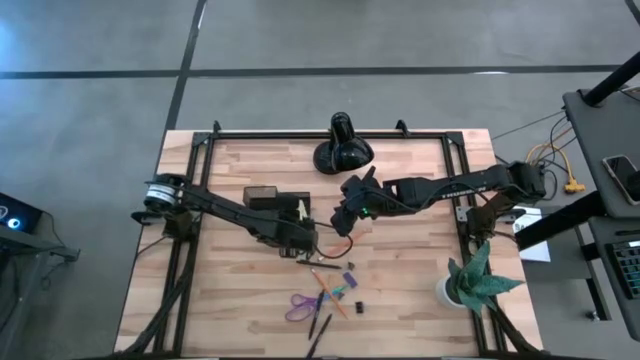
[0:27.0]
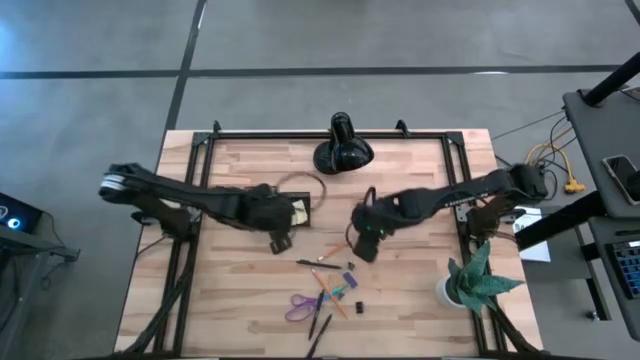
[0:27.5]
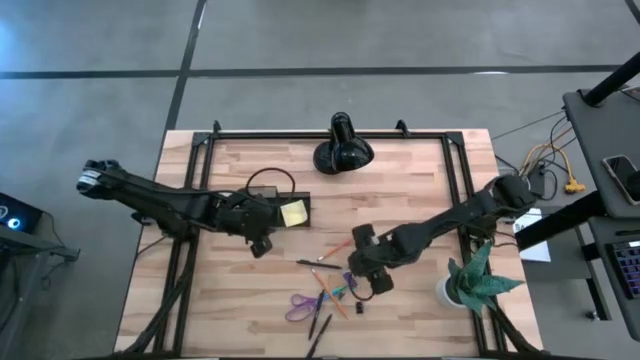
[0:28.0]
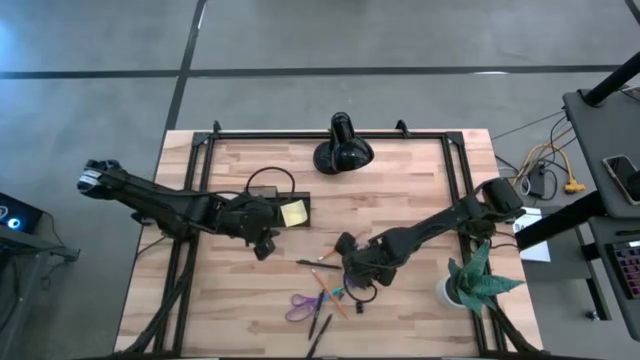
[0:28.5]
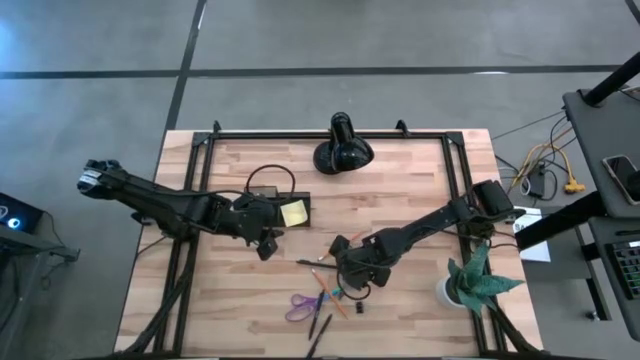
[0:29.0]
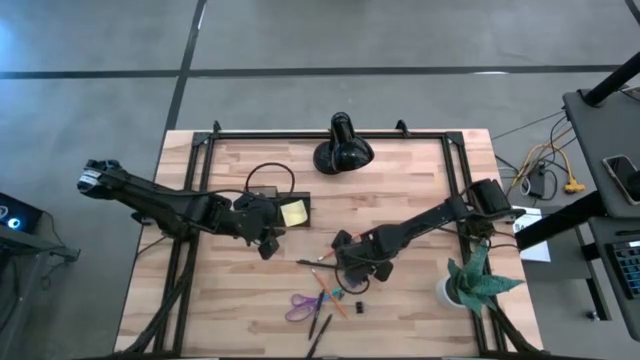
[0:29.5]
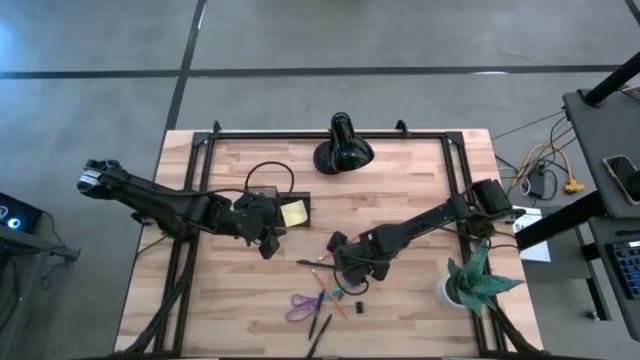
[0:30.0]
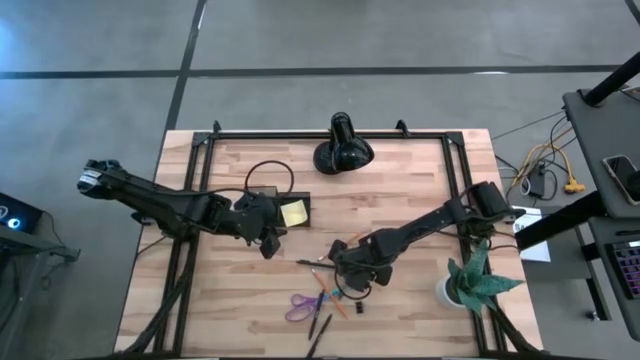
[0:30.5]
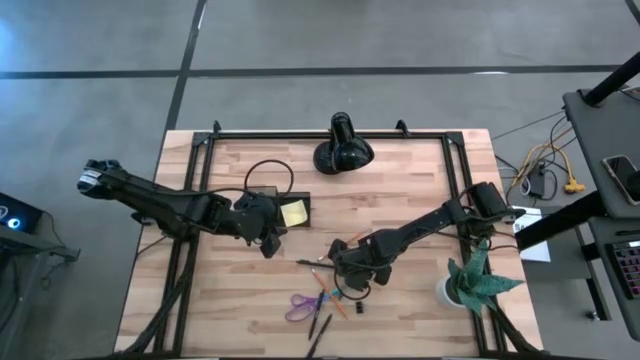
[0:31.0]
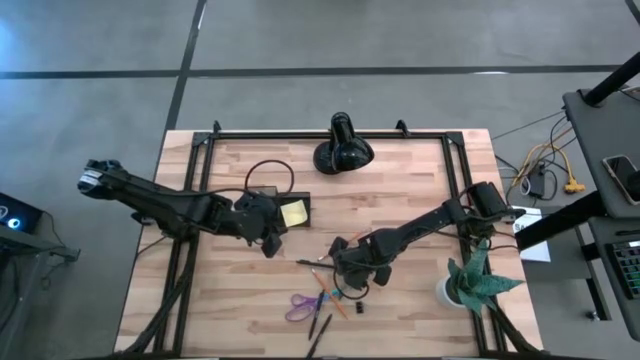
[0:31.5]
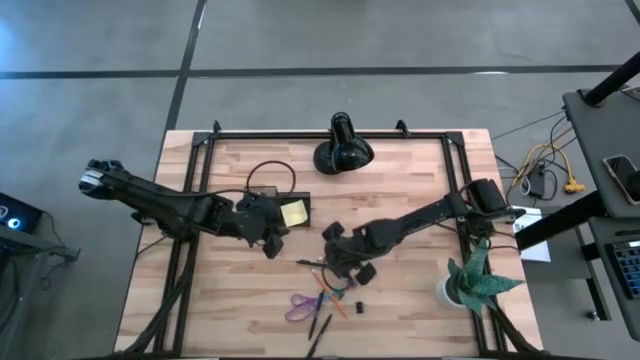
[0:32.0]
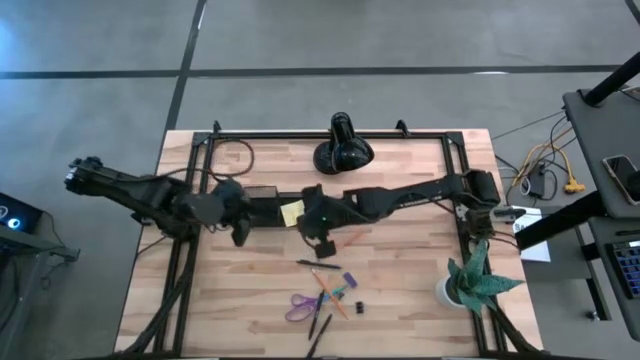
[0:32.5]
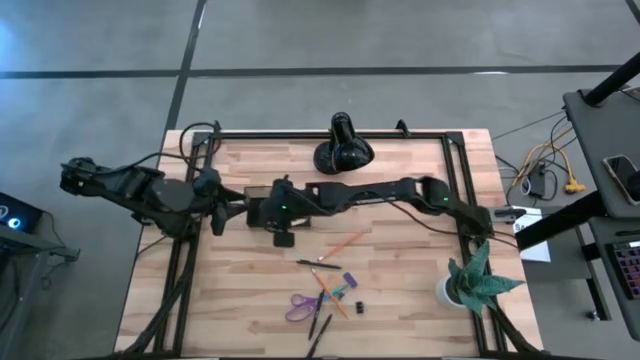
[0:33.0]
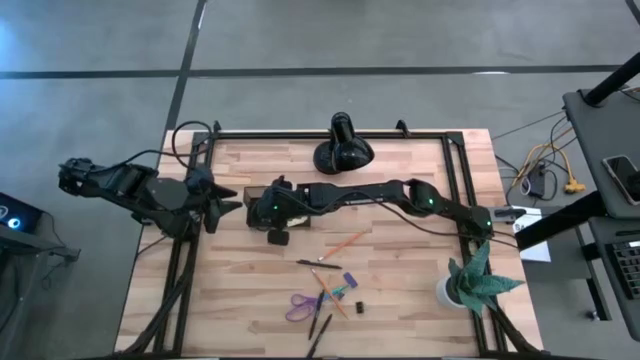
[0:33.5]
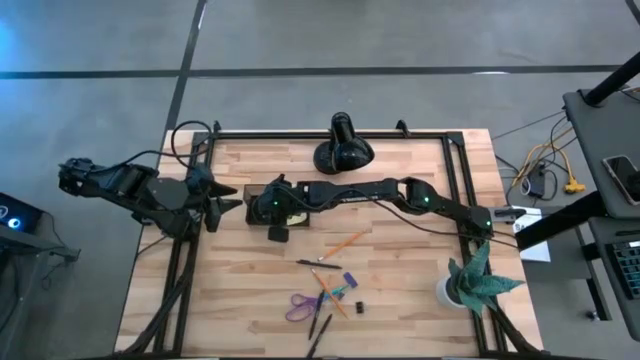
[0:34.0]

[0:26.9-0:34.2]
Task: Pick and place office supplies into organizer
Put the top black binder clip into the black desk organizer

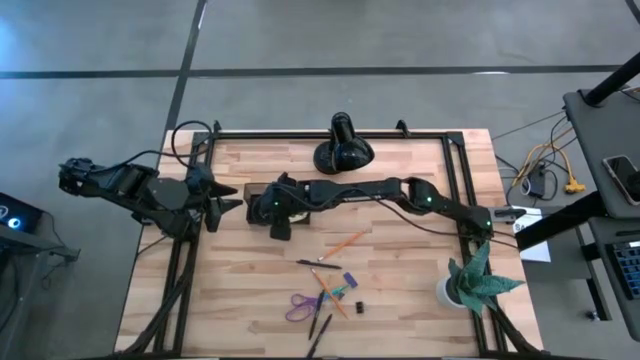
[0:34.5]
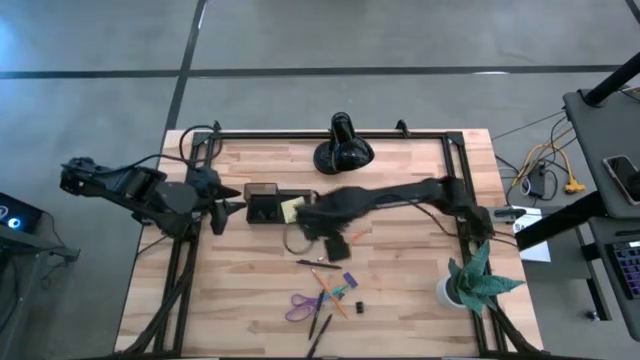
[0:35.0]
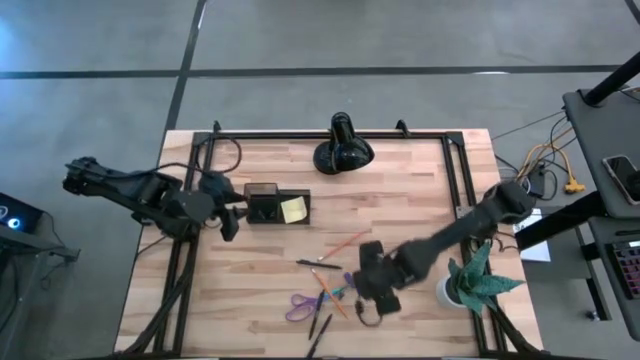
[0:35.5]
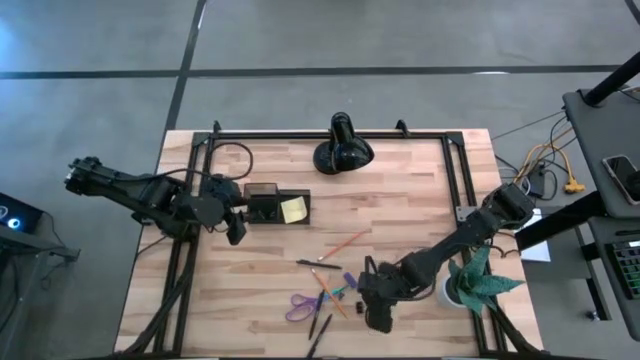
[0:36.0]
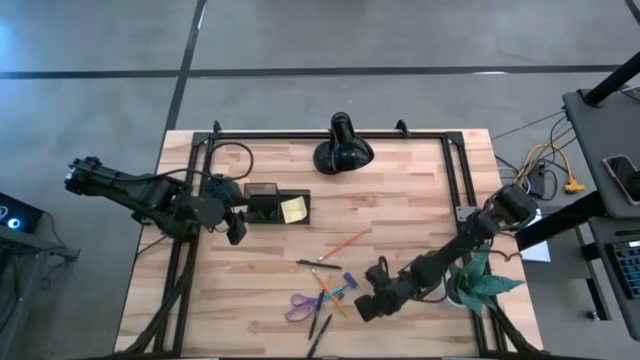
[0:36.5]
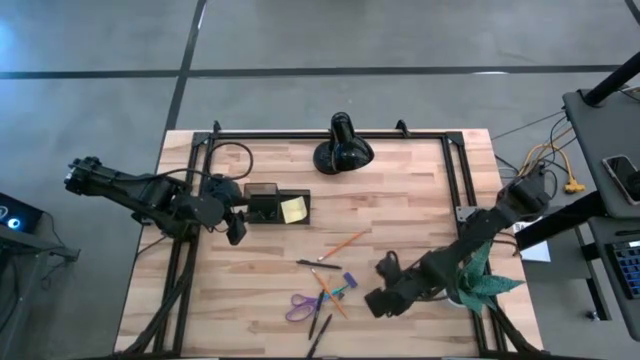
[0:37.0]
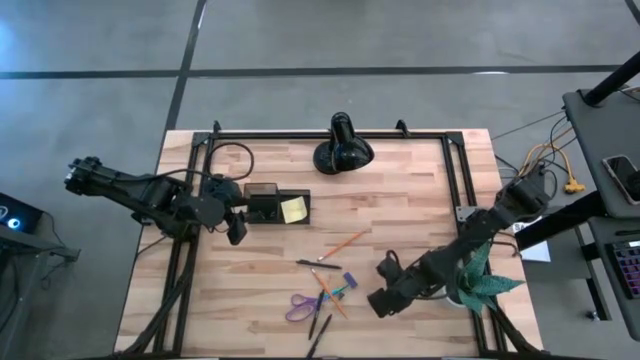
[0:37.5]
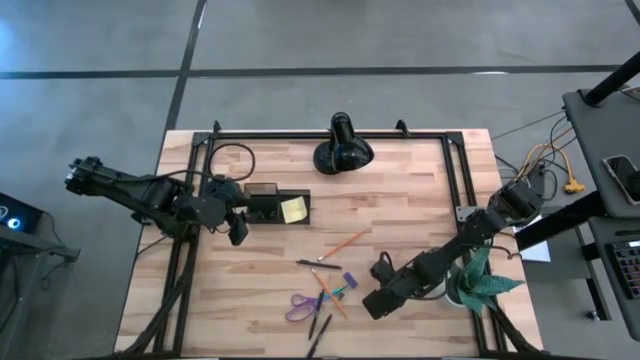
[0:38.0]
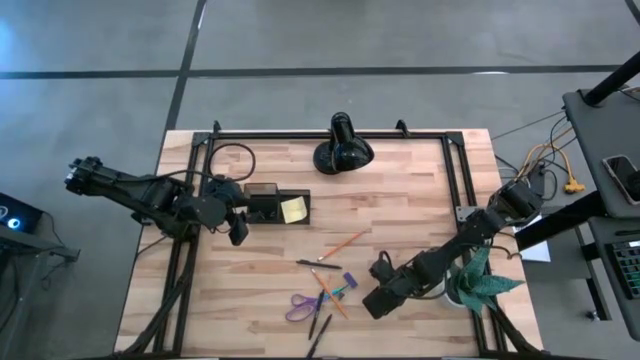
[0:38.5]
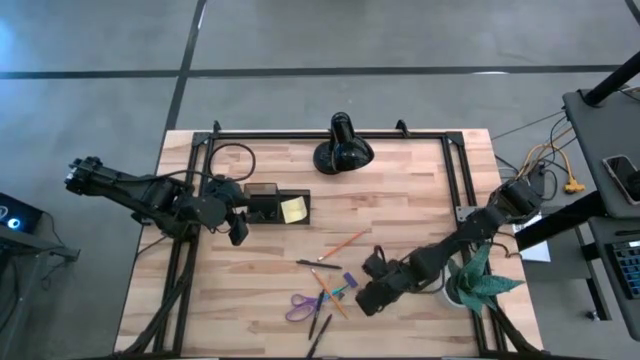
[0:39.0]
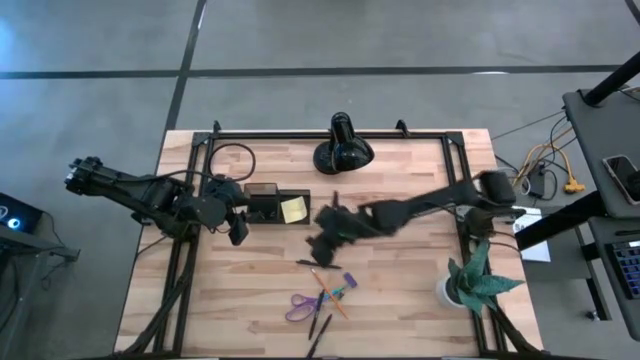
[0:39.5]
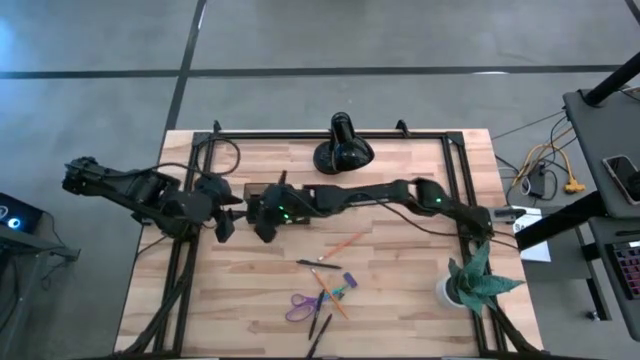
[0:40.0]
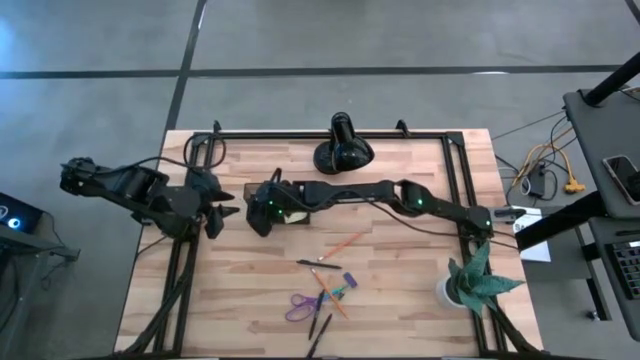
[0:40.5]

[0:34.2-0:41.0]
Put the right black binder clip into the black desk organizer

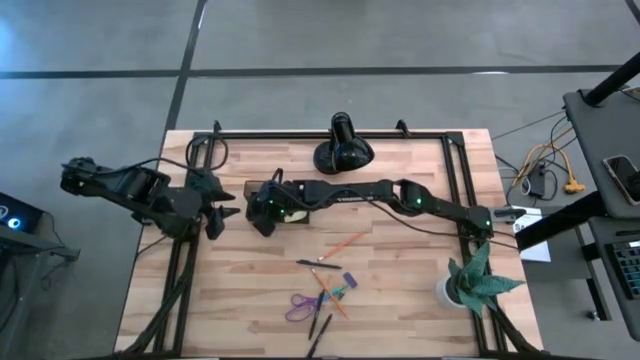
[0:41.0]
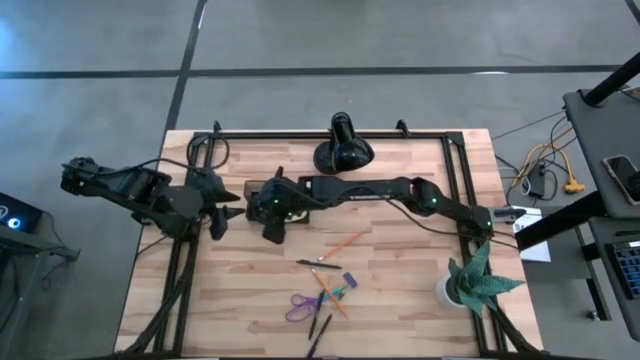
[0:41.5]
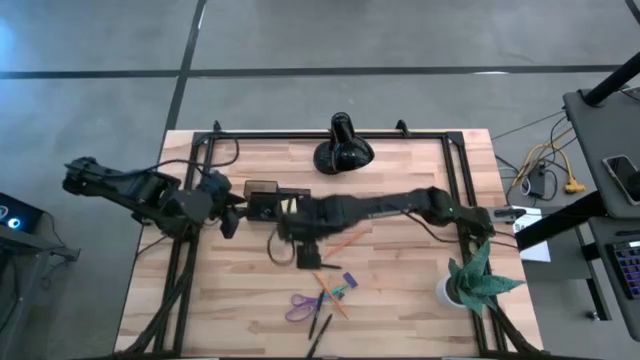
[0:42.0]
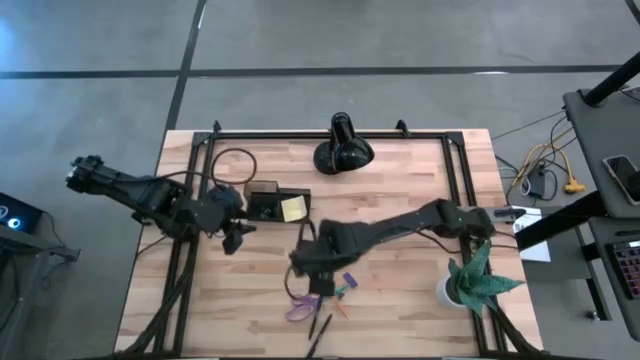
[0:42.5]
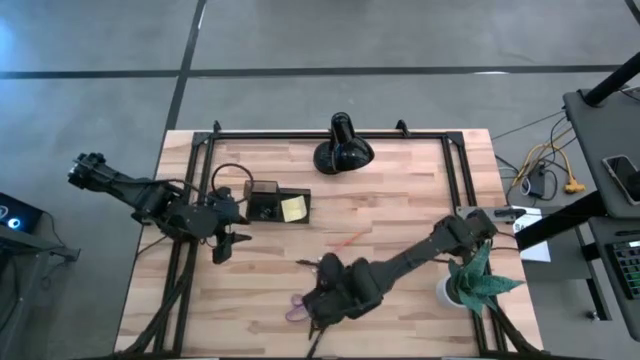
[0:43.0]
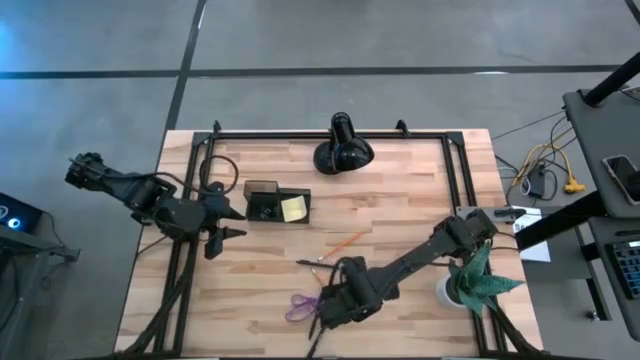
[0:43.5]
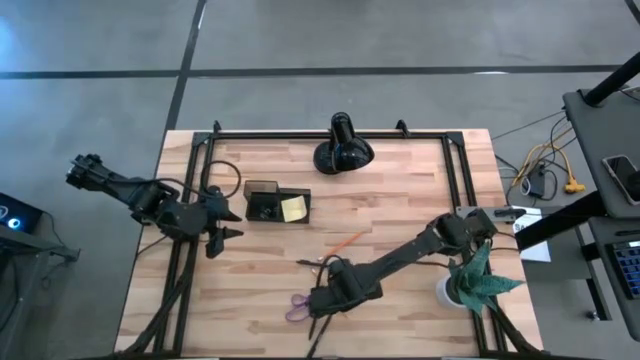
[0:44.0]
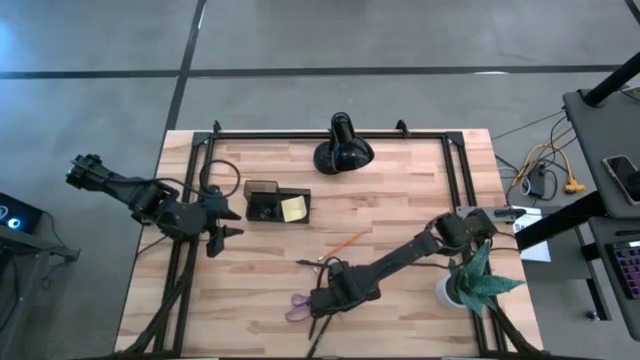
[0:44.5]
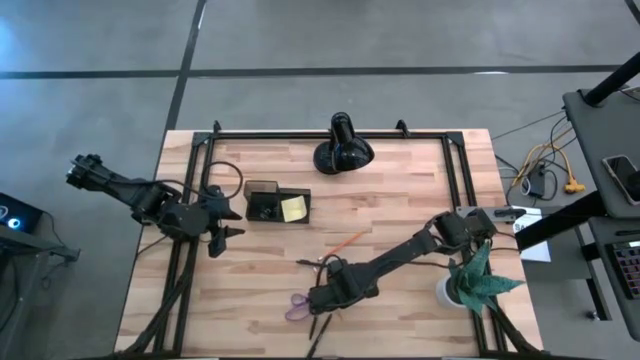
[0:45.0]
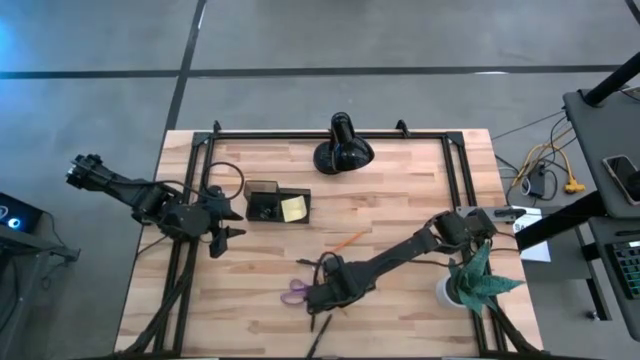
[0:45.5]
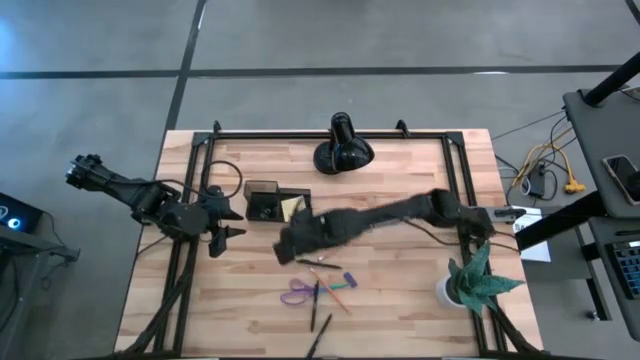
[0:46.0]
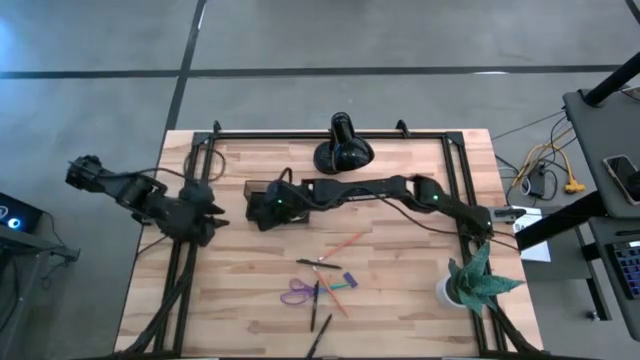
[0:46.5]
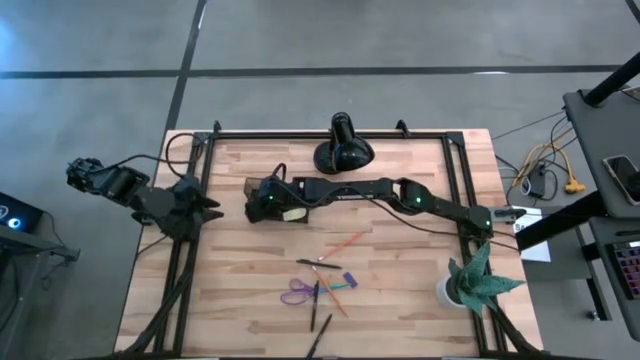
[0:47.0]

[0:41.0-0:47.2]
Put the black binder clip into the black desk organizer

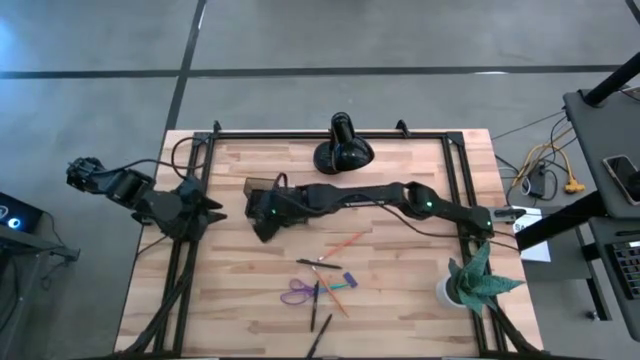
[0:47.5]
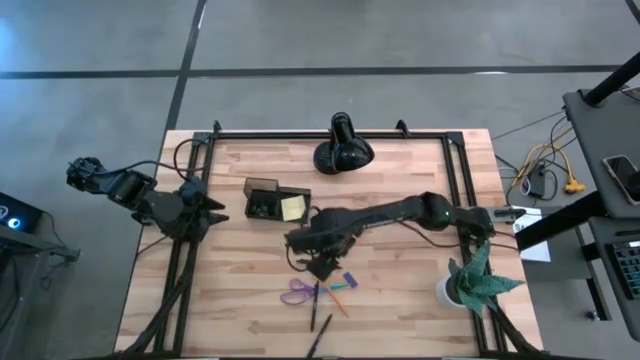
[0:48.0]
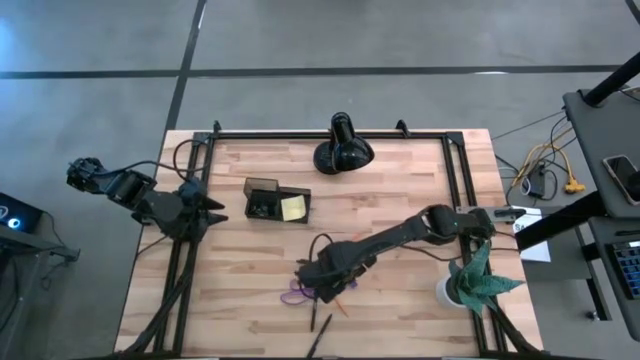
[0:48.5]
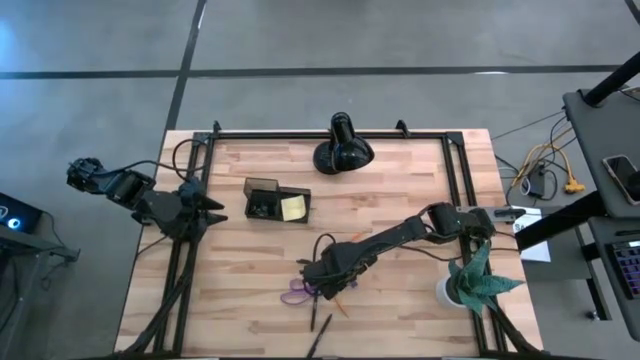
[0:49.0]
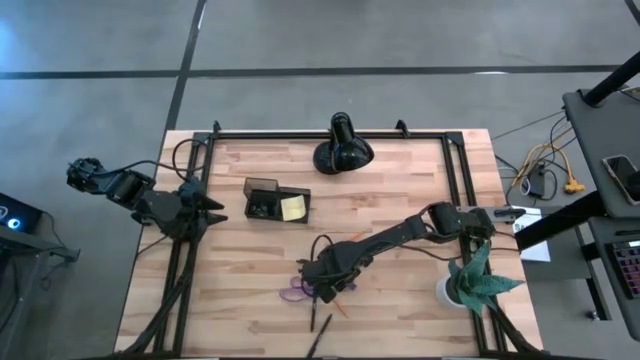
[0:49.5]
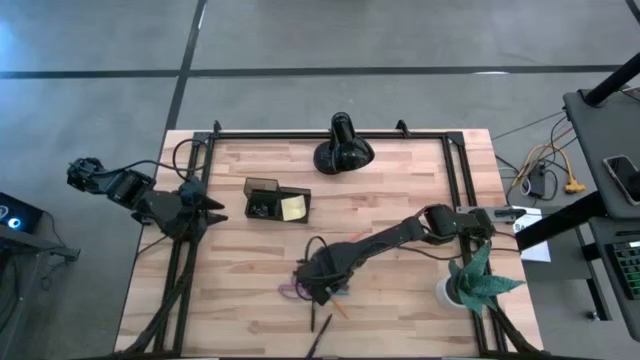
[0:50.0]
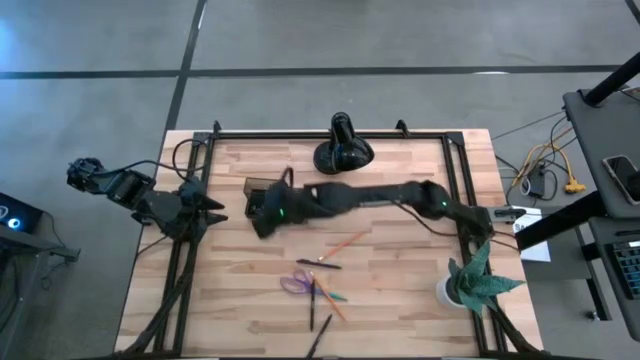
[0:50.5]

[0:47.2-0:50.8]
Put the blue eraser into the black desk organizer
